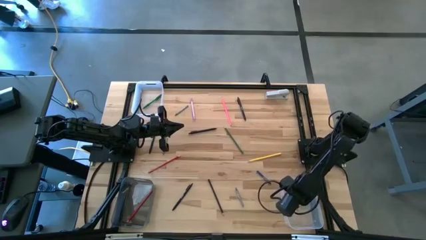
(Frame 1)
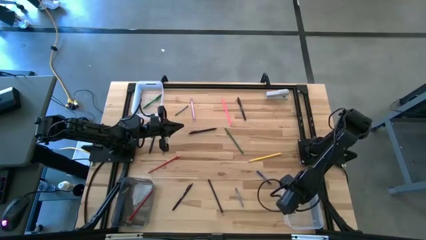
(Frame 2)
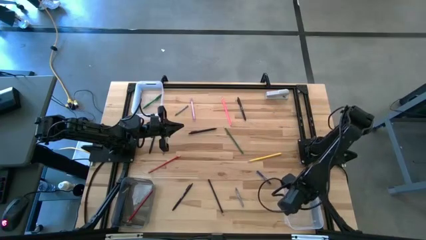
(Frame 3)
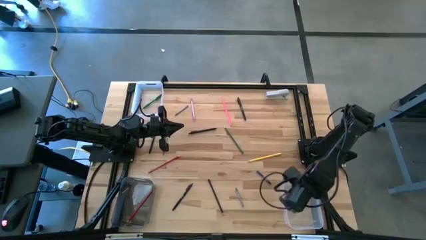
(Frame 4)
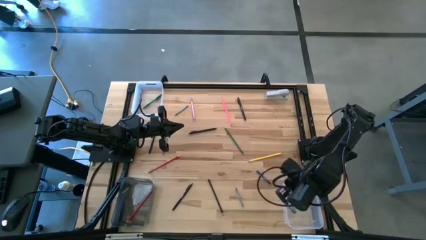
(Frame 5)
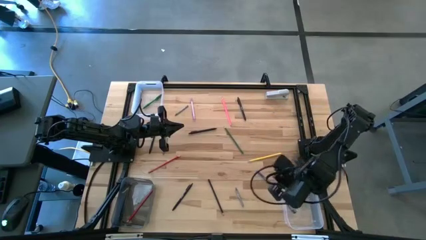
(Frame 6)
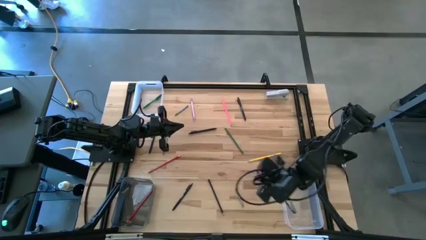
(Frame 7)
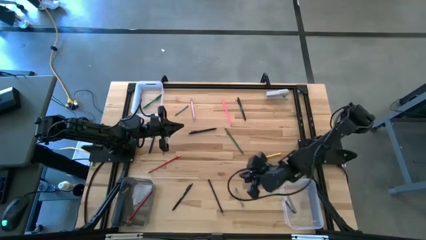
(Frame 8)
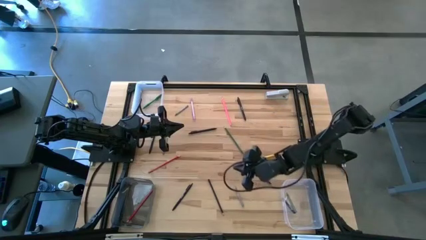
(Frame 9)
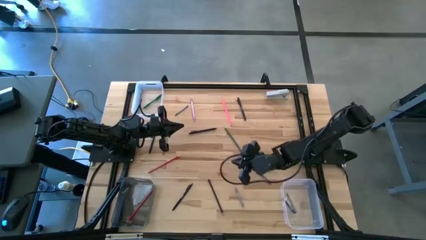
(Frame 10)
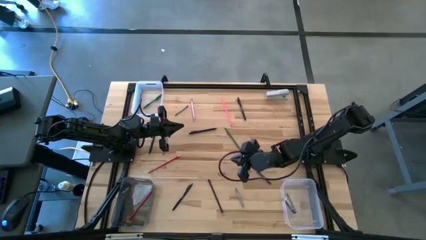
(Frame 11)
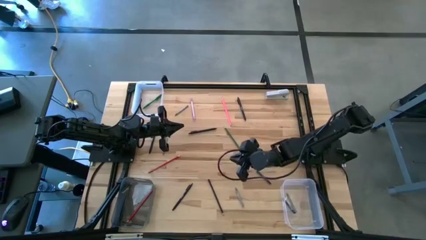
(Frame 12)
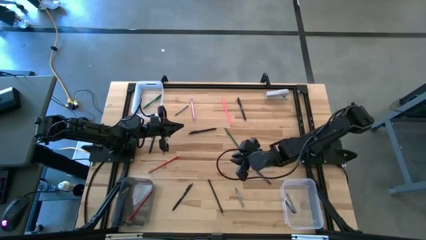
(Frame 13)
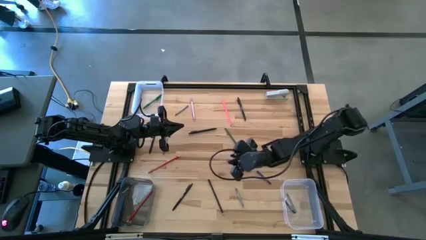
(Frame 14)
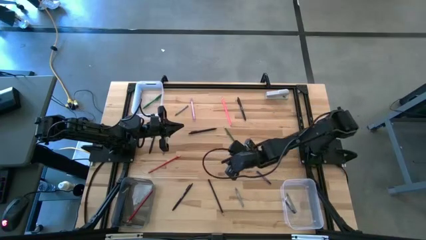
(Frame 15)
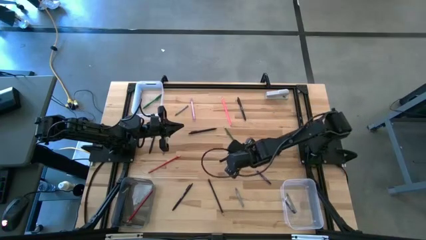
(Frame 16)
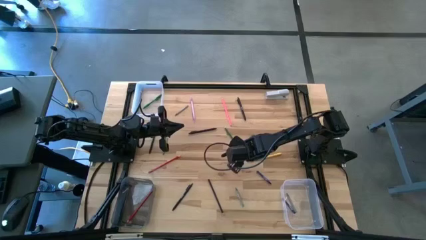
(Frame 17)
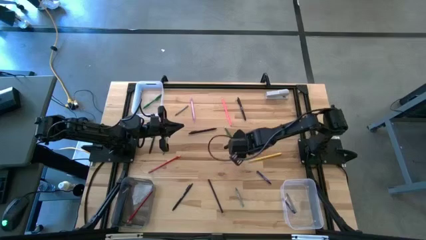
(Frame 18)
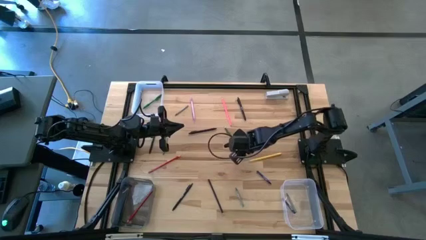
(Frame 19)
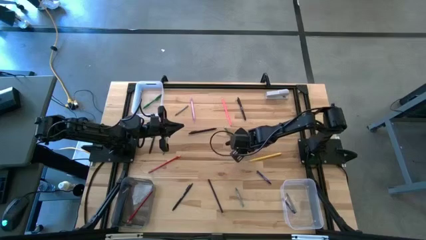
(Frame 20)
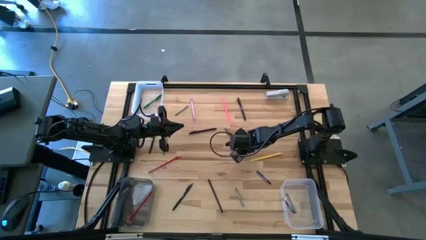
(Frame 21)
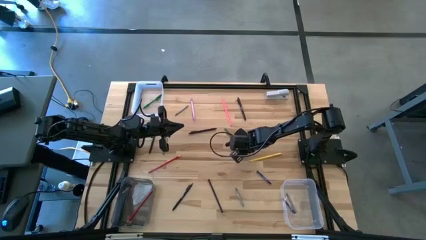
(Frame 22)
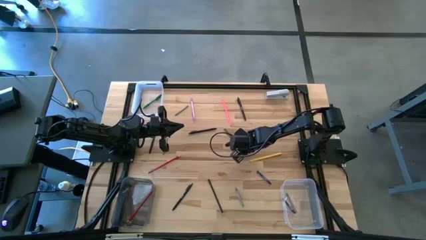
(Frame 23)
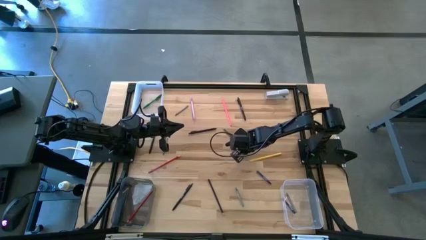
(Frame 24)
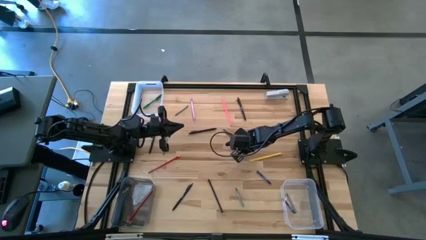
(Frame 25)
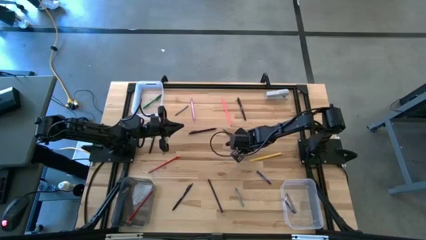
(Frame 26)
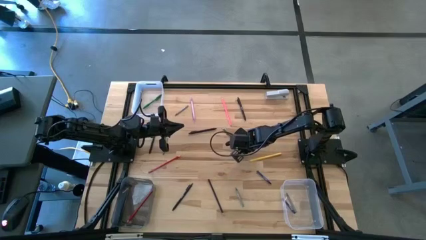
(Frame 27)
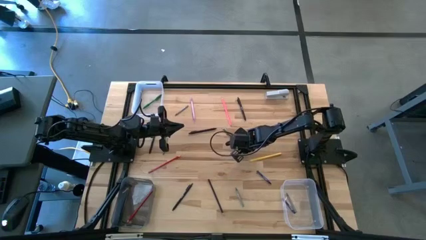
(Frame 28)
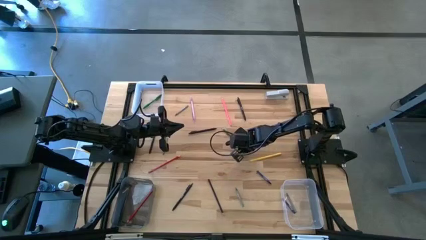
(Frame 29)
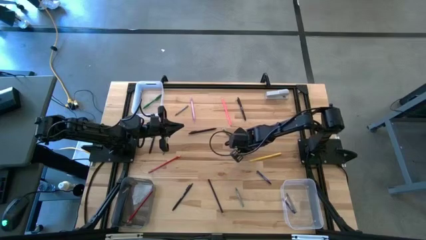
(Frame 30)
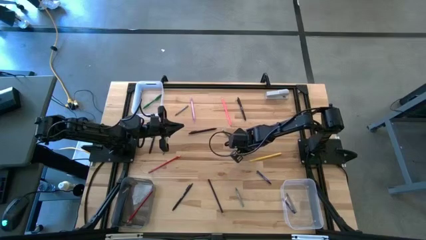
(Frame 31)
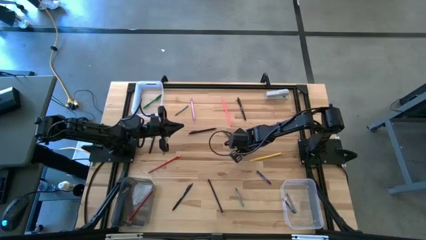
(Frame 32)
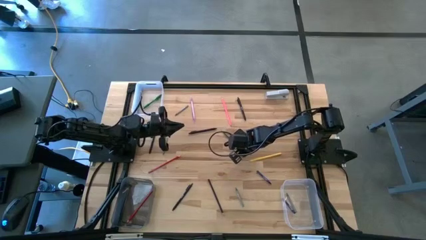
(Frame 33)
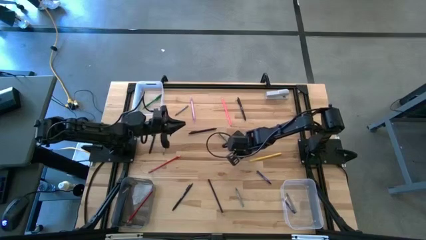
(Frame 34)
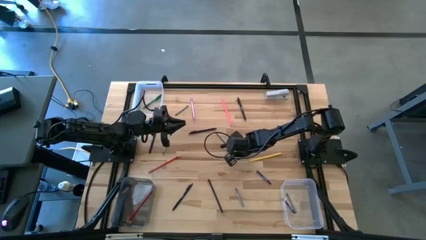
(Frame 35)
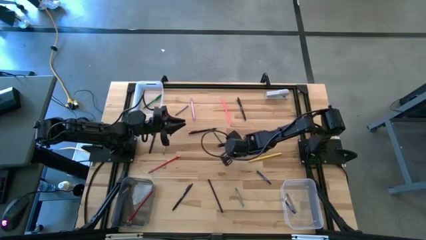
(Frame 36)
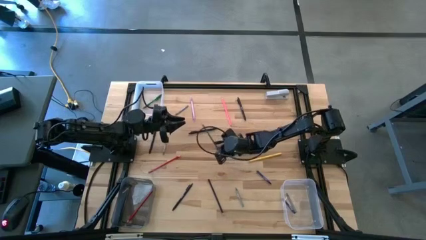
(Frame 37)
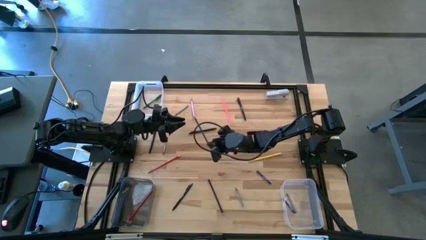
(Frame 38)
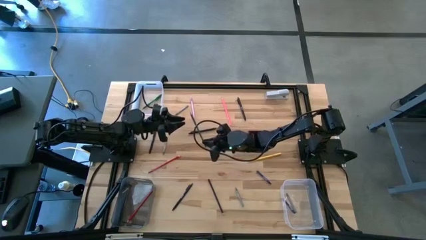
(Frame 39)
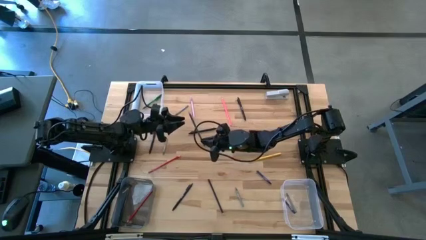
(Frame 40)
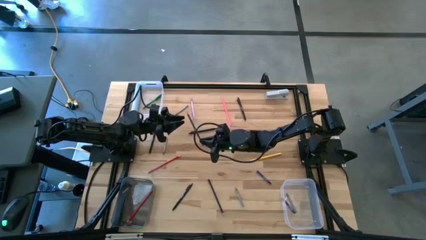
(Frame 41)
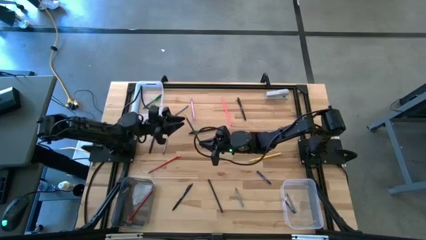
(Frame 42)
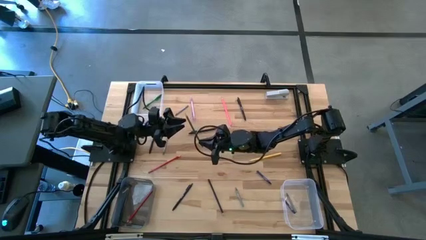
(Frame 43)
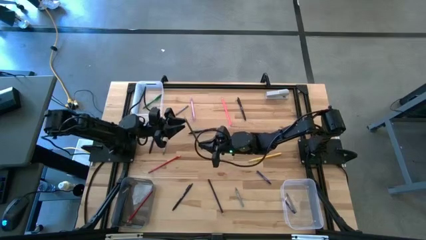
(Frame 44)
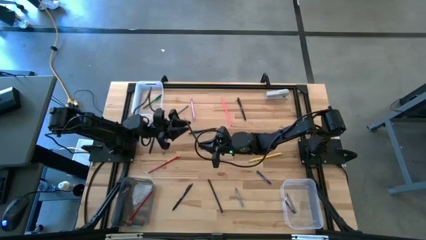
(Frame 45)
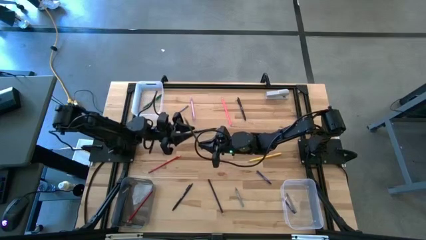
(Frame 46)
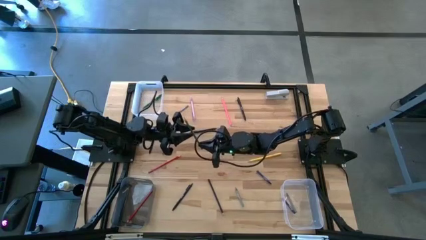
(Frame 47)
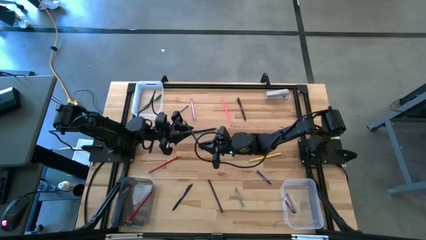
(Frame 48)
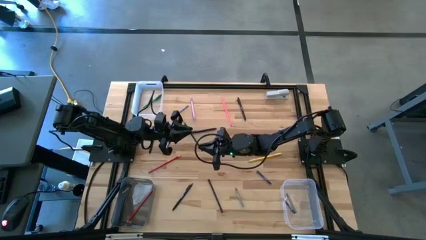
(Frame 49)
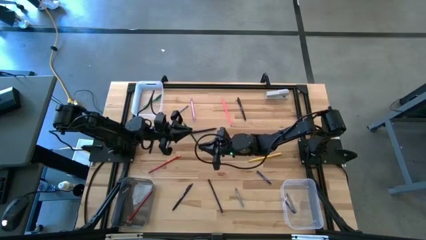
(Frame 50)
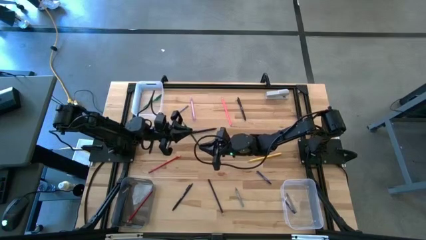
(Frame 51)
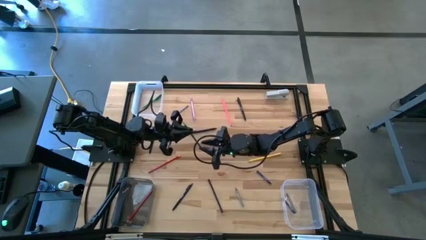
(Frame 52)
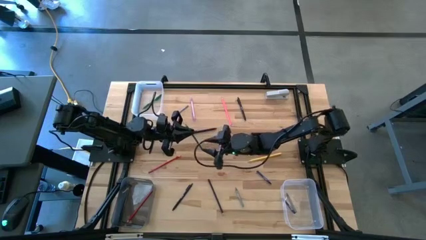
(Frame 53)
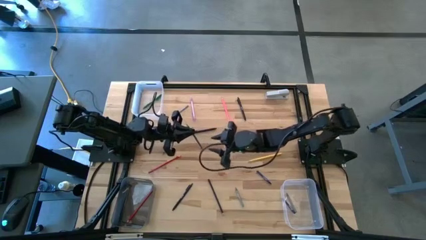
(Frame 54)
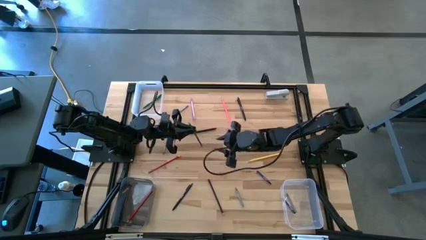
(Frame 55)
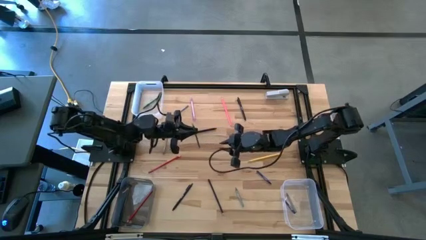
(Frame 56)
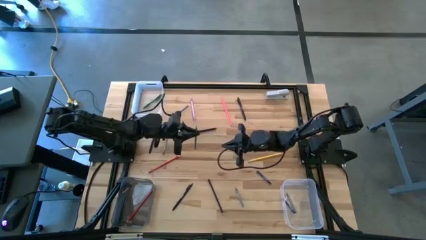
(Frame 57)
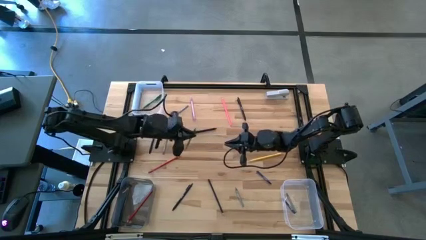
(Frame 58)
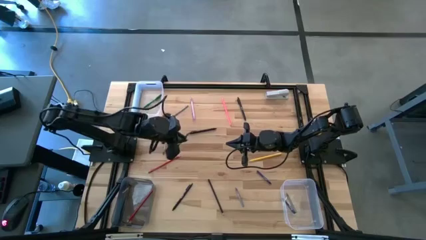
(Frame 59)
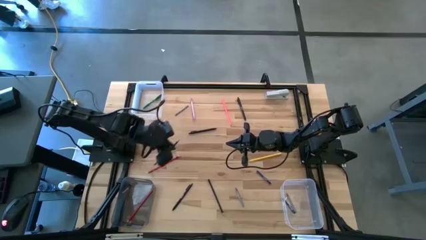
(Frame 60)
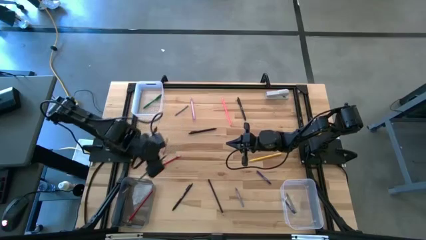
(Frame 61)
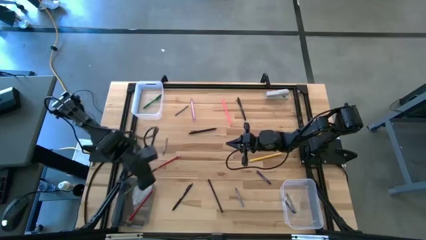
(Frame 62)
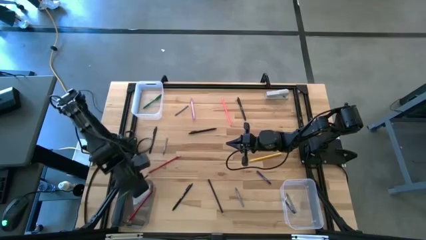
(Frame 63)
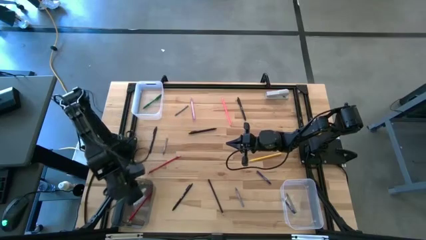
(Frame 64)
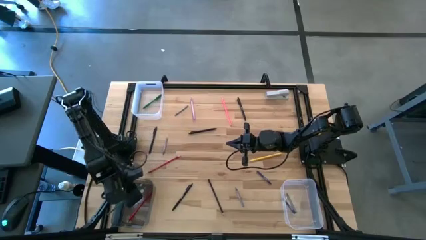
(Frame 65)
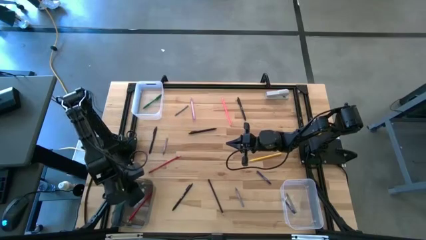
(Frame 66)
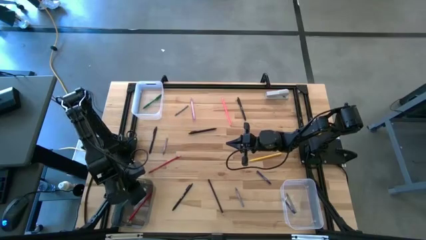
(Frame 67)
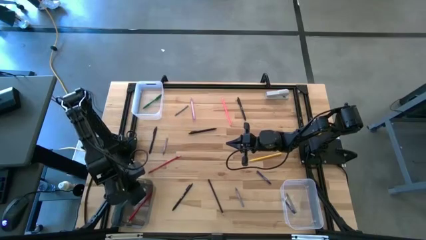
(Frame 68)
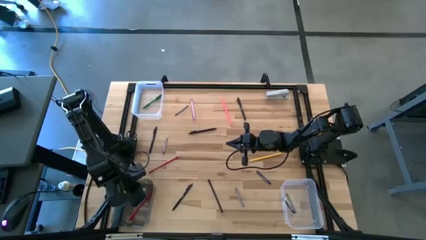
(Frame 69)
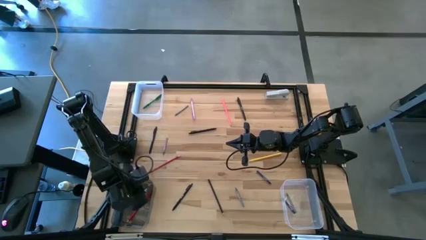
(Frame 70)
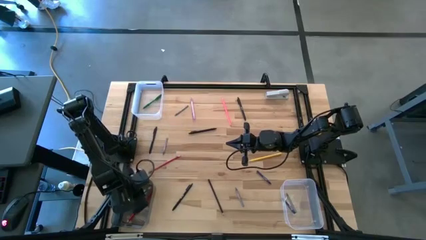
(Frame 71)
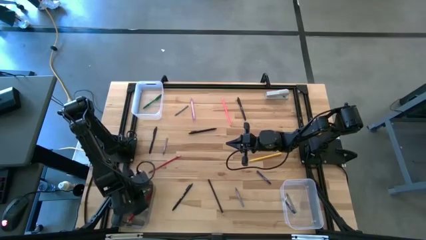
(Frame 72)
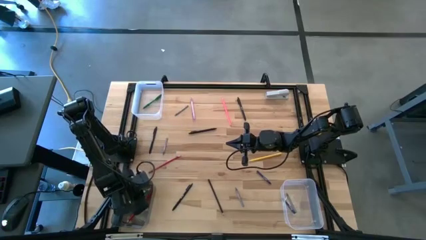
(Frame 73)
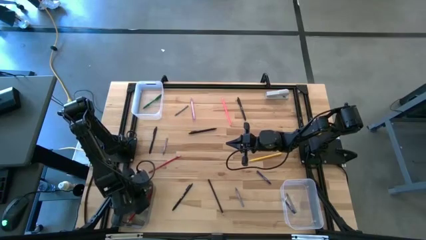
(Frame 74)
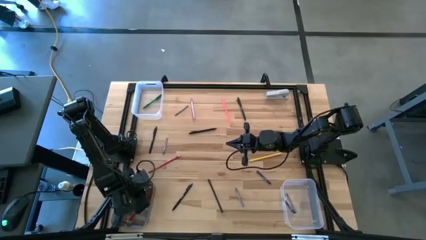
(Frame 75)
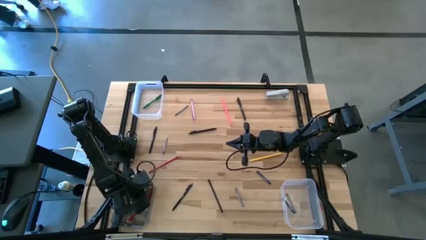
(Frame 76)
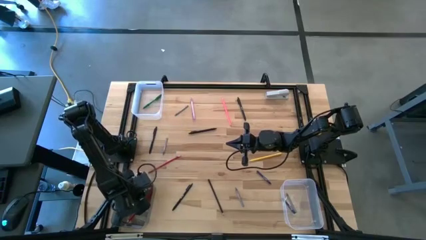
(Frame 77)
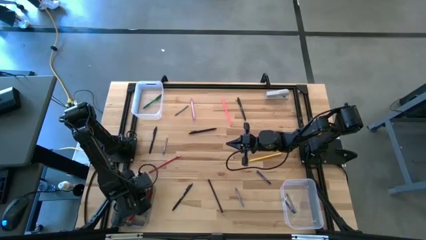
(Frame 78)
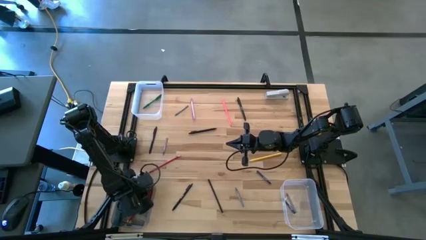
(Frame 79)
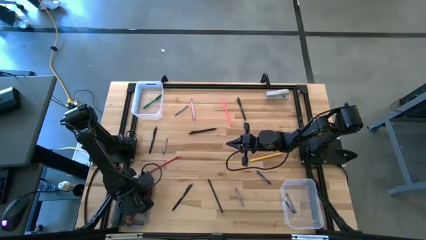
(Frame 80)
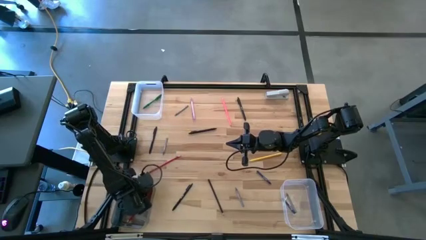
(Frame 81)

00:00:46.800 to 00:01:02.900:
Task: Sort crayons/erasers/pens/pencils in bins
Put the green pencil into the black bin
